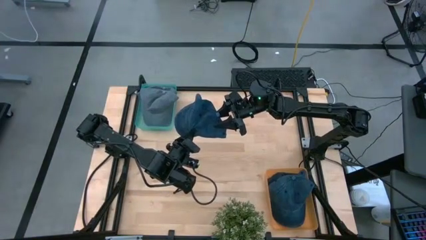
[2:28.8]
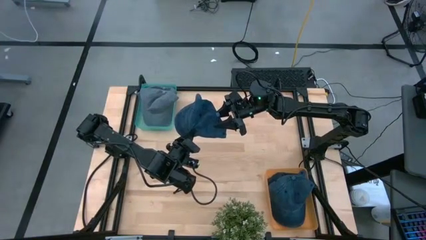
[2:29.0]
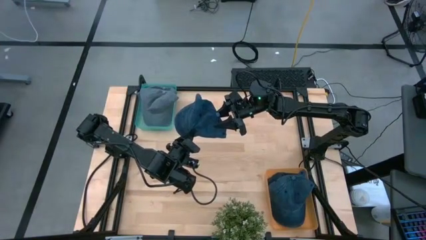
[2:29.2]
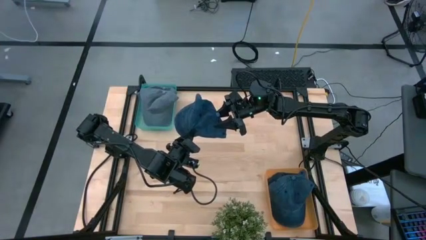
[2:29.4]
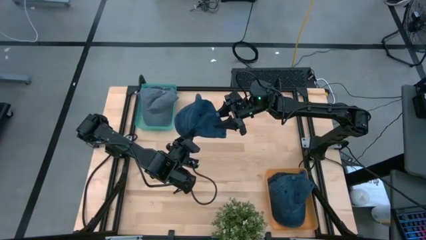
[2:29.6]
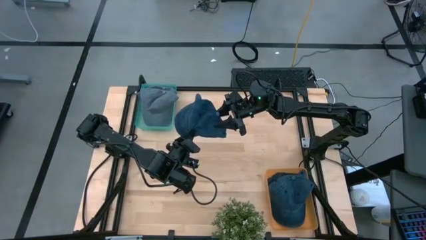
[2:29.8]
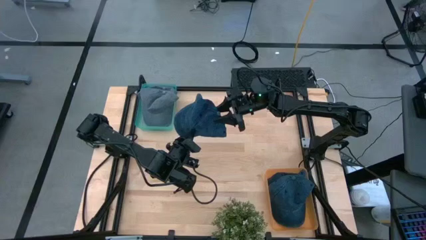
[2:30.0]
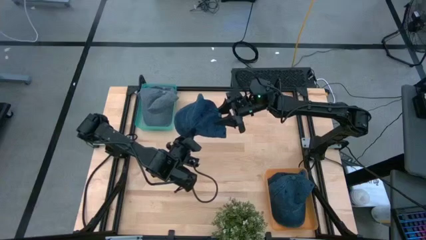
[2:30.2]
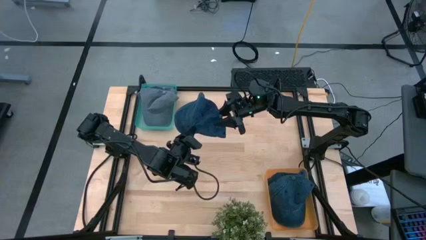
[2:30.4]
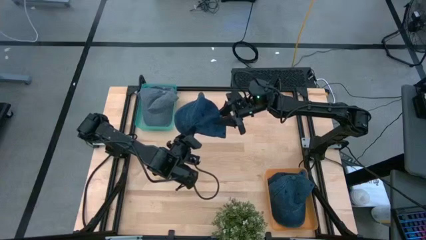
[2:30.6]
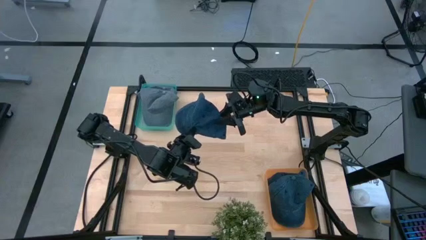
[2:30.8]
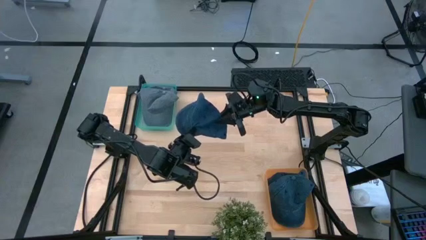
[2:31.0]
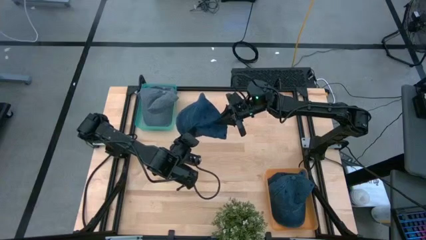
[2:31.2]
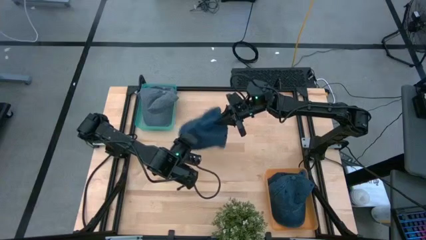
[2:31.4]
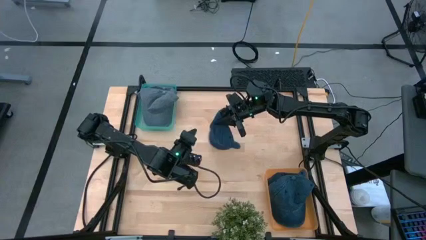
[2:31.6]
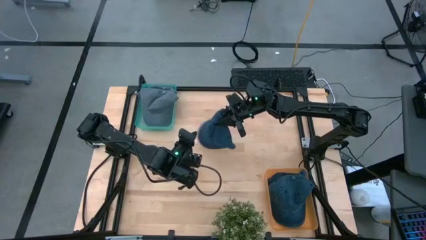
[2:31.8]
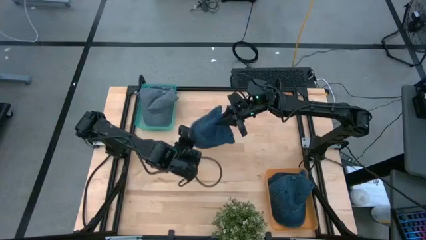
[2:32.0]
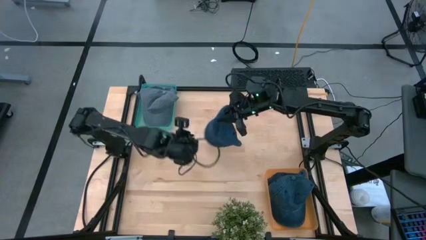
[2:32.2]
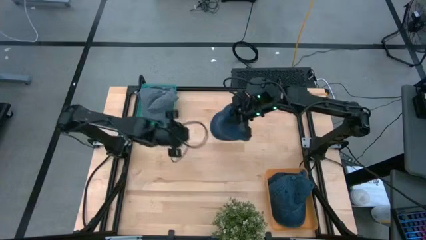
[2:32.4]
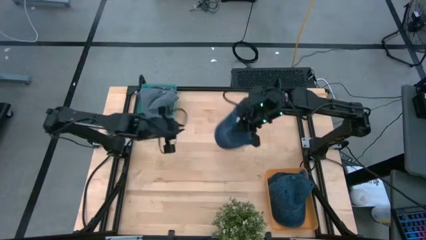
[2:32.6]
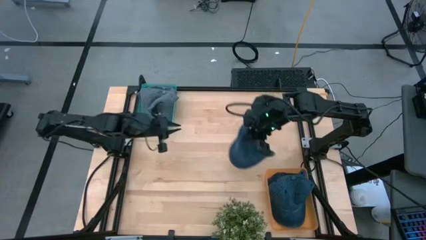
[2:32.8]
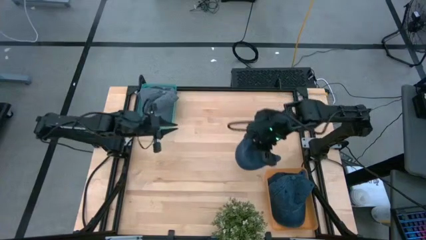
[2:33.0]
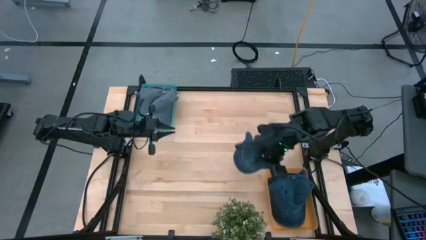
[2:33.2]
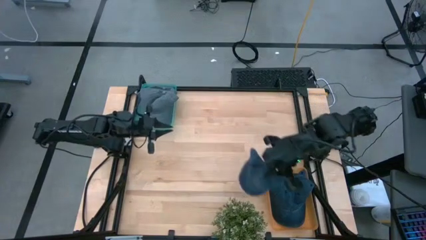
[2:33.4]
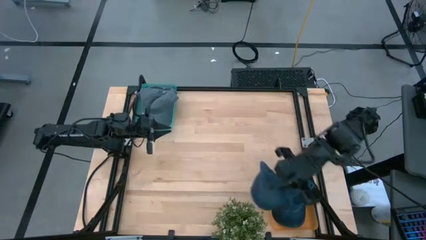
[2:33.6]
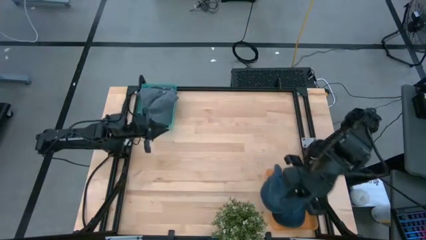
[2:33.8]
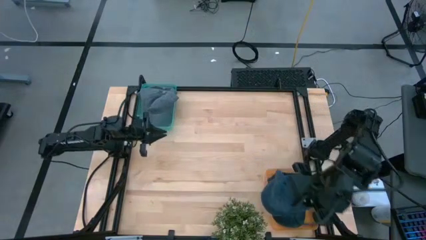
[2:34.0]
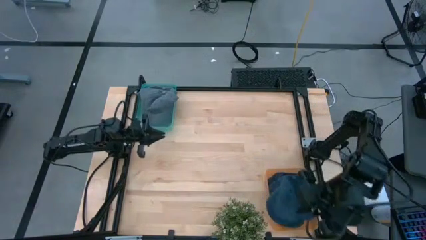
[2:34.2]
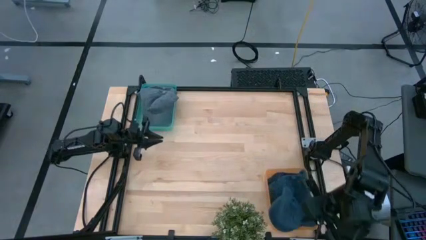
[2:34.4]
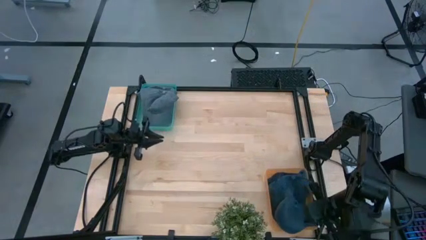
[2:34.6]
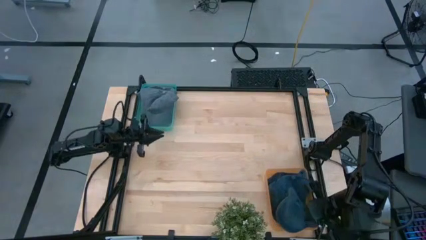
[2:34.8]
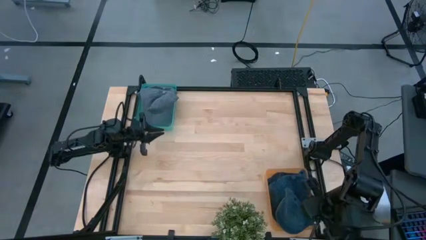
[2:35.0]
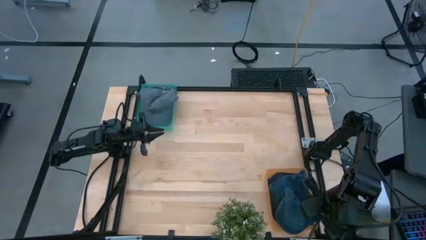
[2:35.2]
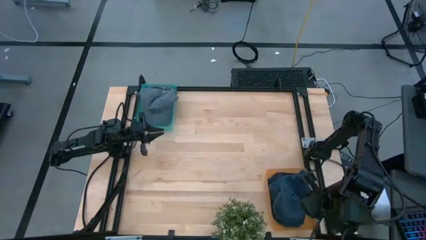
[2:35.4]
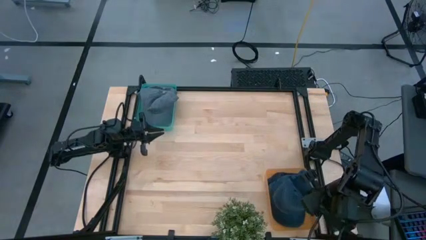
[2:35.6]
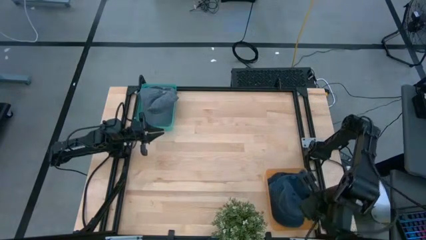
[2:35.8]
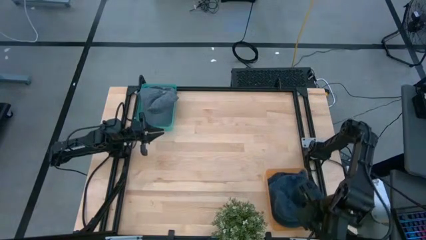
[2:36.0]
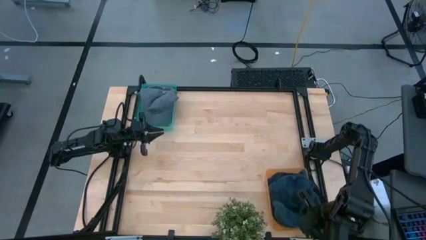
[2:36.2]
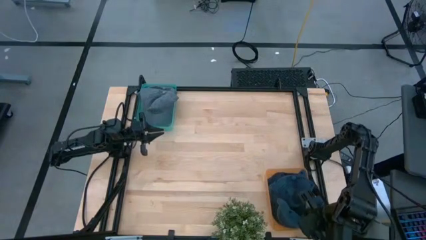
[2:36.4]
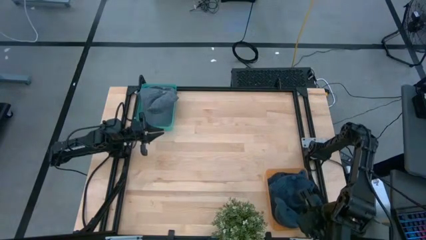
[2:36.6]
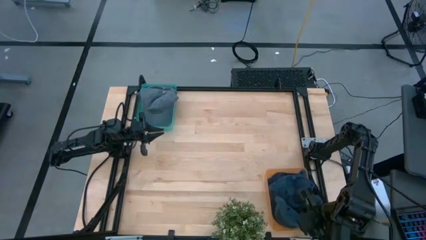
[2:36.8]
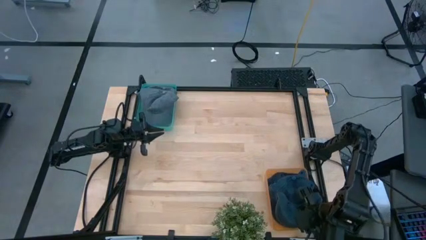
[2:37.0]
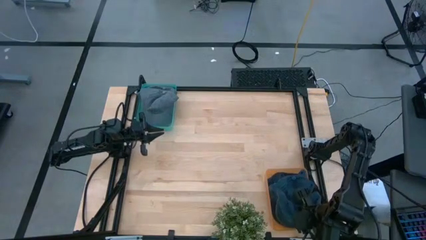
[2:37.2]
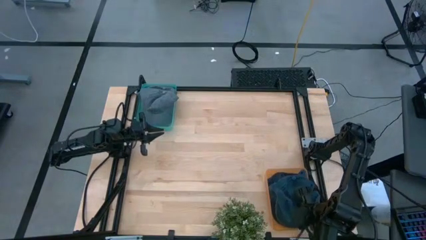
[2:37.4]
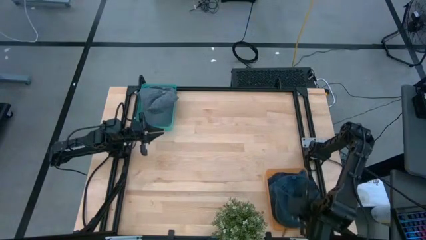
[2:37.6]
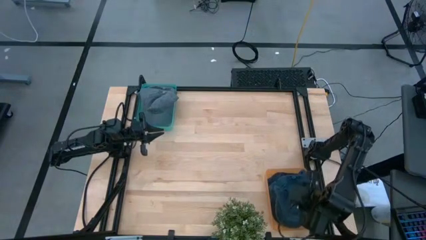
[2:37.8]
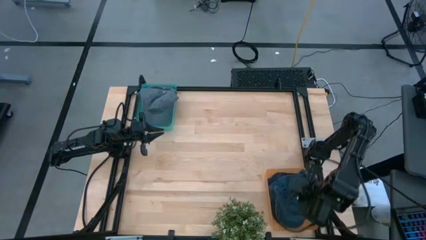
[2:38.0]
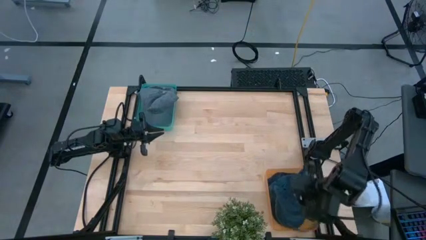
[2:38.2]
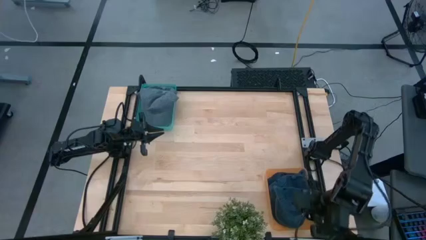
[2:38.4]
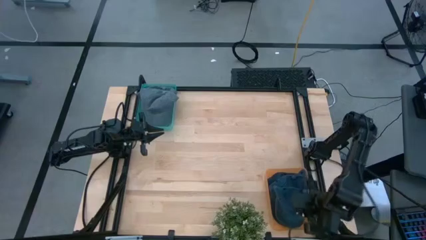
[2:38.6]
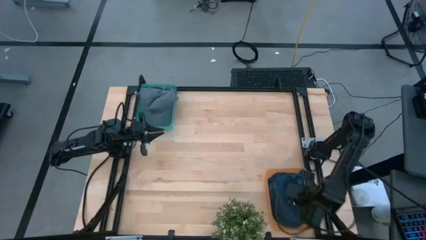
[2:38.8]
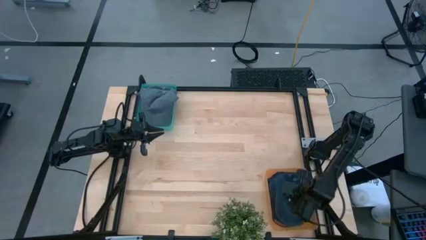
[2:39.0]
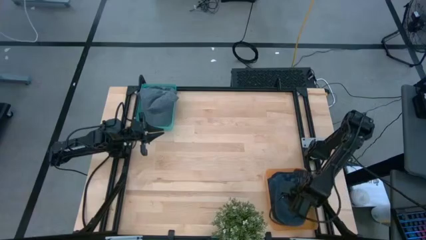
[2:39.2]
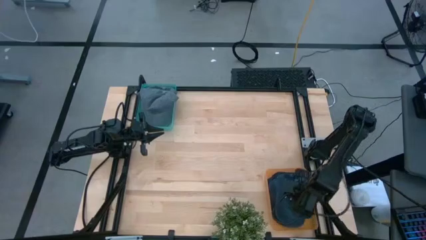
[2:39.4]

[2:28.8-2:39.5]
Task: Pick & Place hat
Put the blue cap into the orange bin

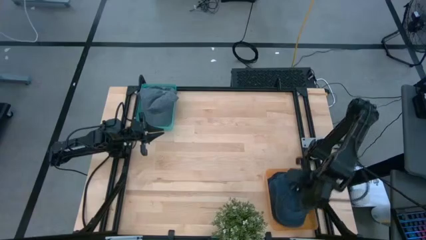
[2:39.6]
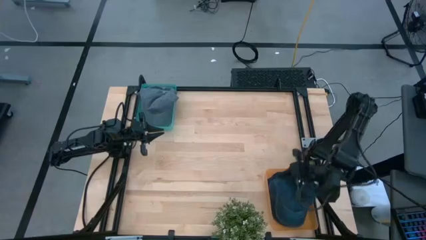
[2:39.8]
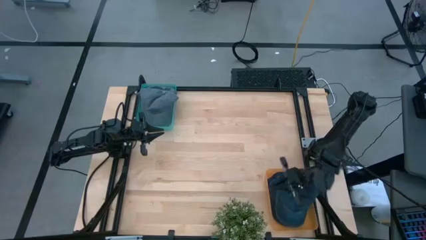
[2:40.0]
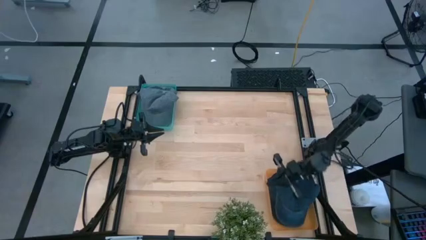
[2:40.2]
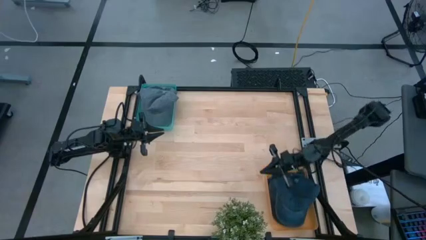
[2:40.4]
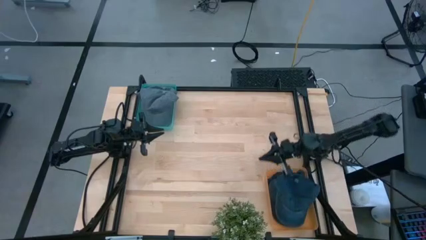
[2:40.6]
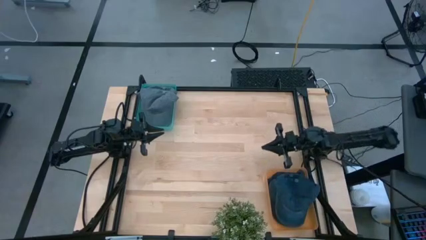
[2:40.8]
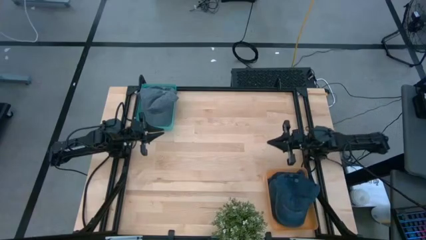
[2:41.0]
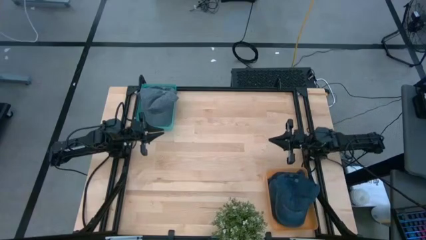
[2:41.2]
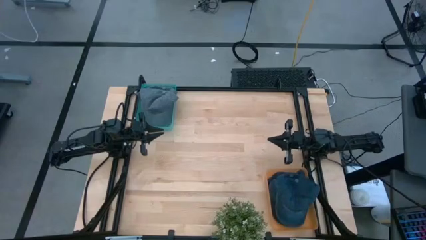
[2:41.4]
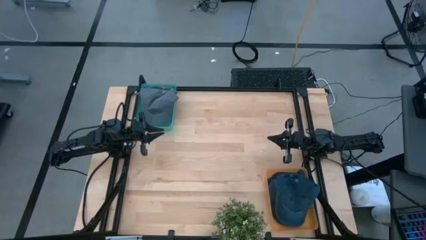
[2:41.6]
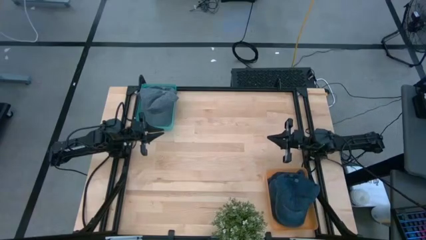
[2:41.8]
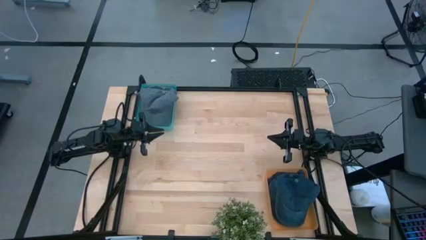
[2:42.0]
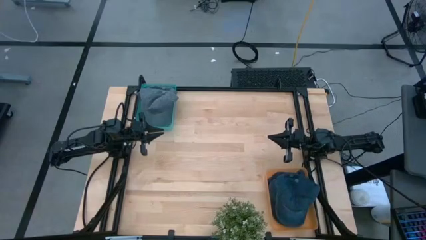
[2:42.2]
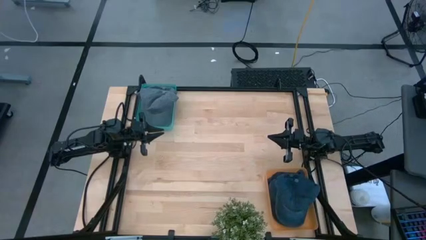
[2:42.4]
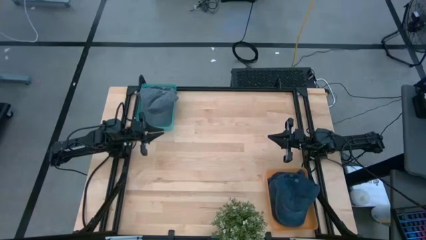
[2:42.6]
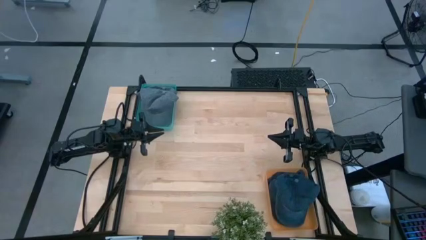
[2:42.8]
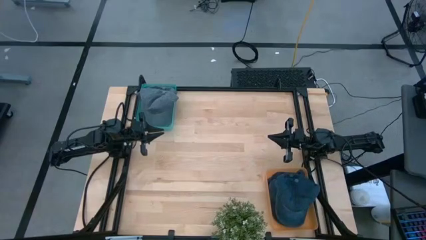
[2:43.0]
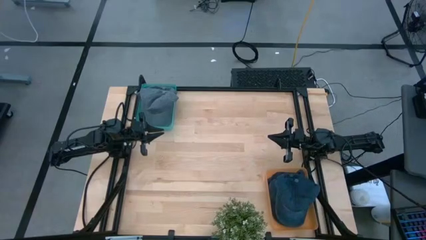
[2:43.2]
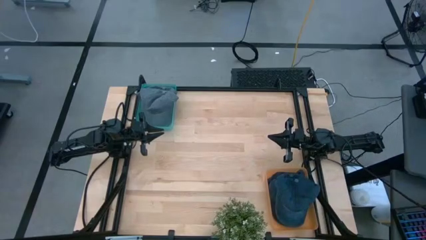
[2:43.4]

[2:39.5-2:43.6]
Return to Home Position
